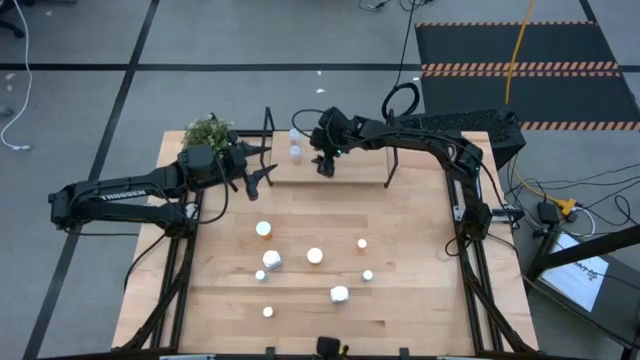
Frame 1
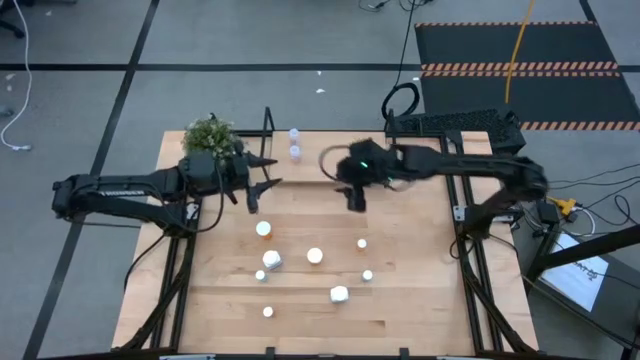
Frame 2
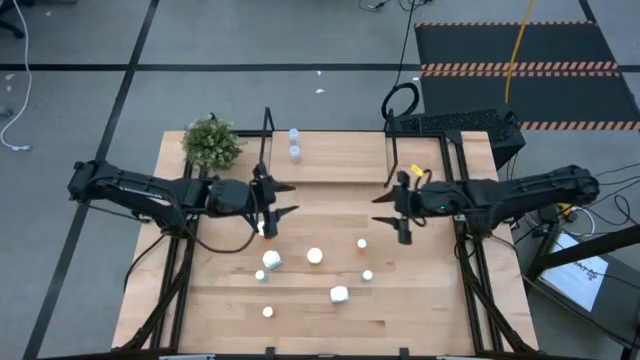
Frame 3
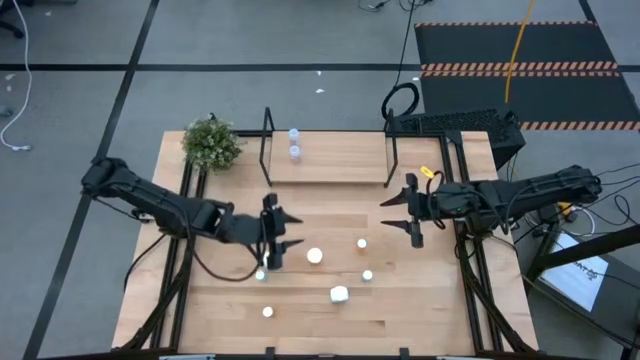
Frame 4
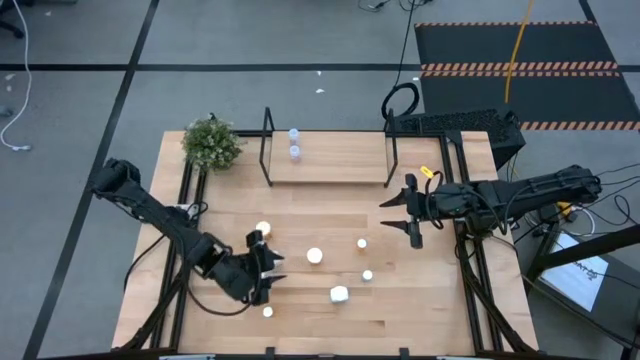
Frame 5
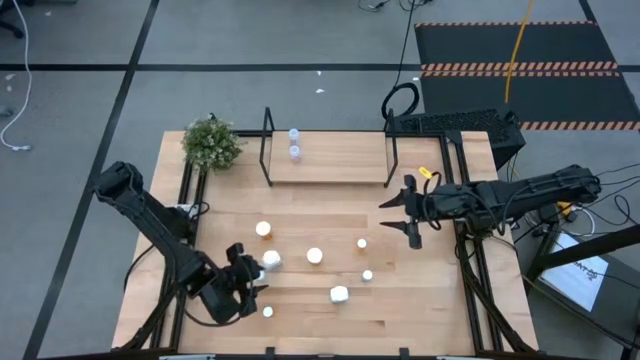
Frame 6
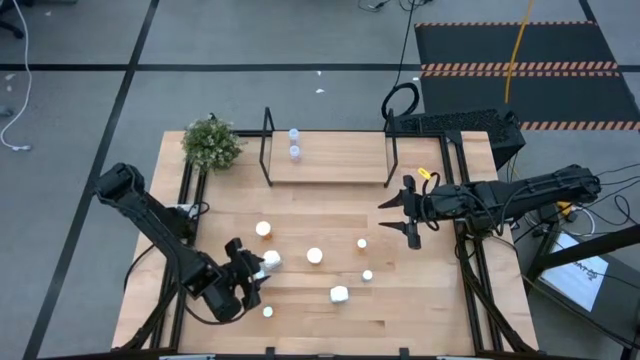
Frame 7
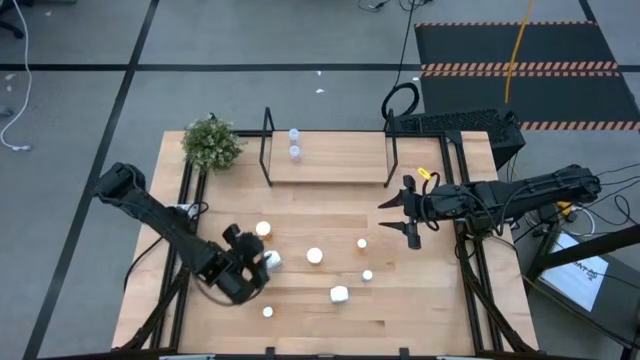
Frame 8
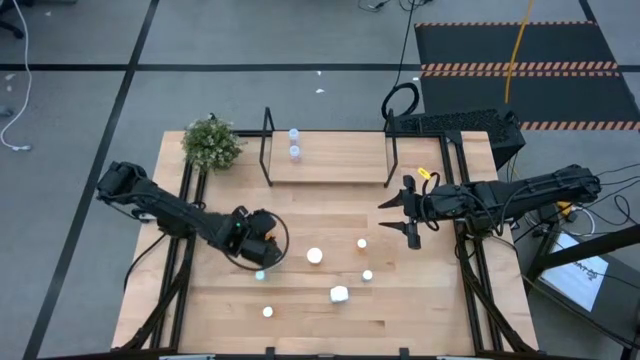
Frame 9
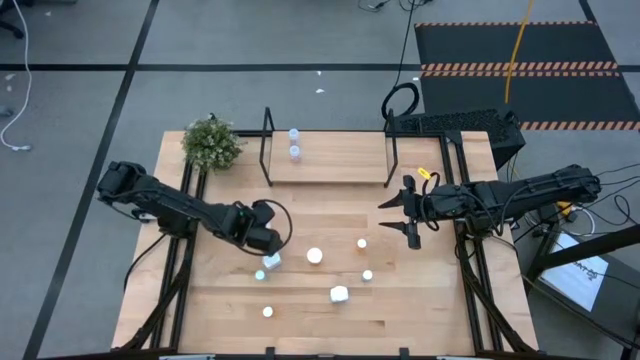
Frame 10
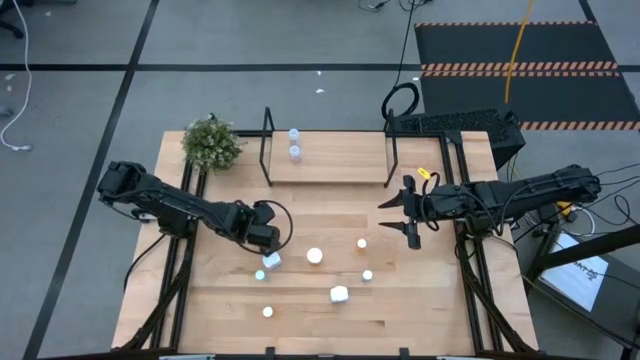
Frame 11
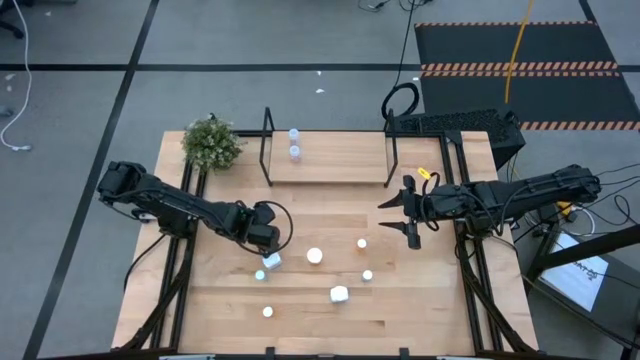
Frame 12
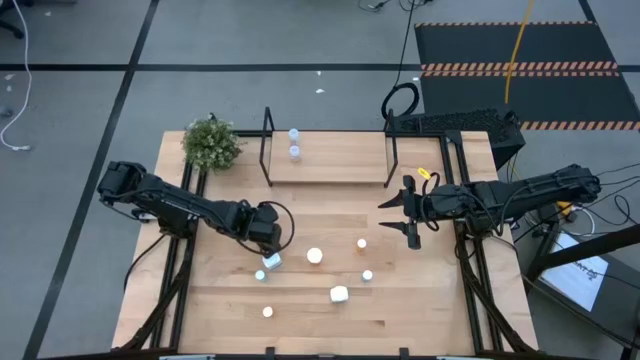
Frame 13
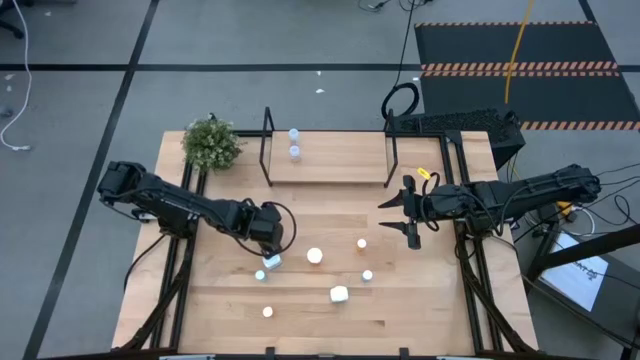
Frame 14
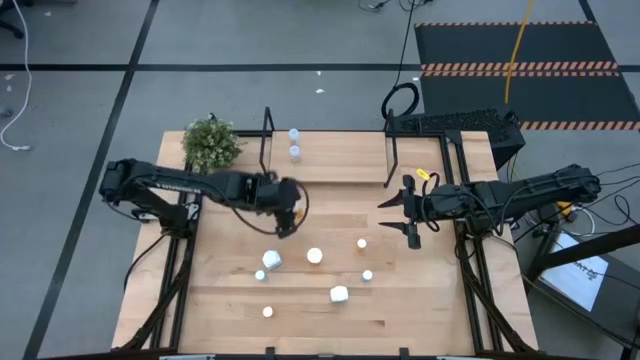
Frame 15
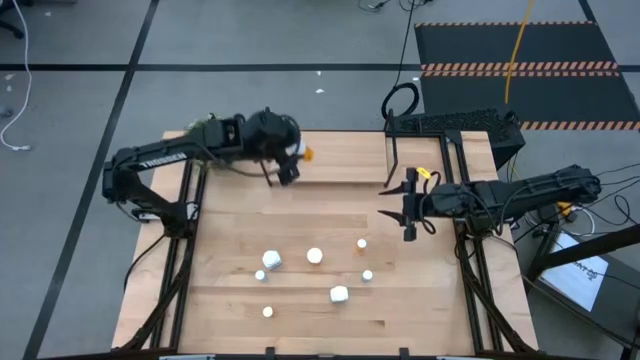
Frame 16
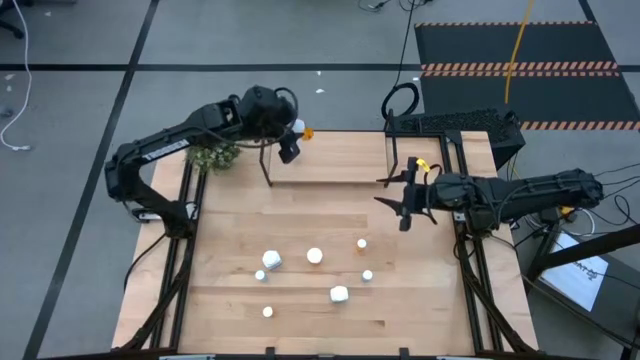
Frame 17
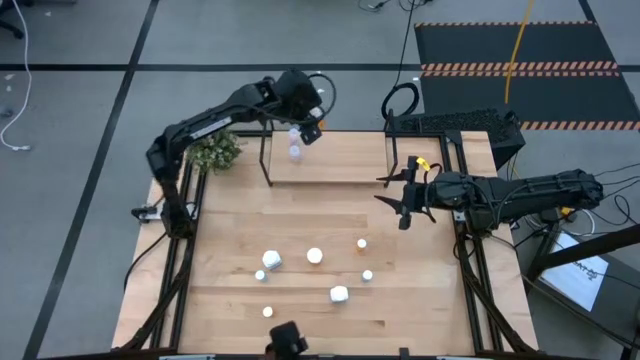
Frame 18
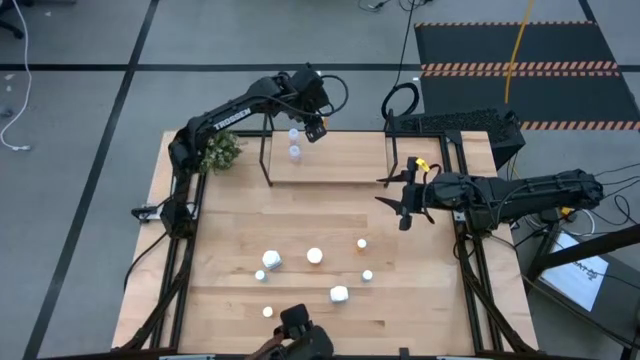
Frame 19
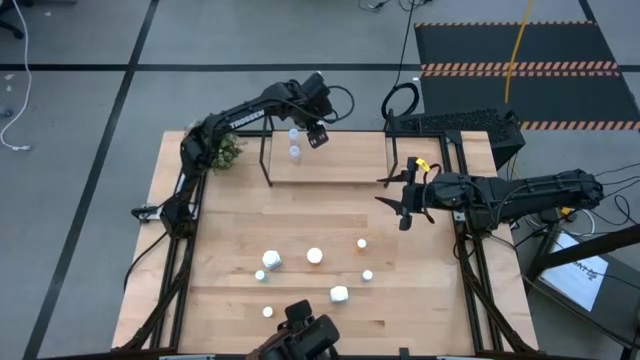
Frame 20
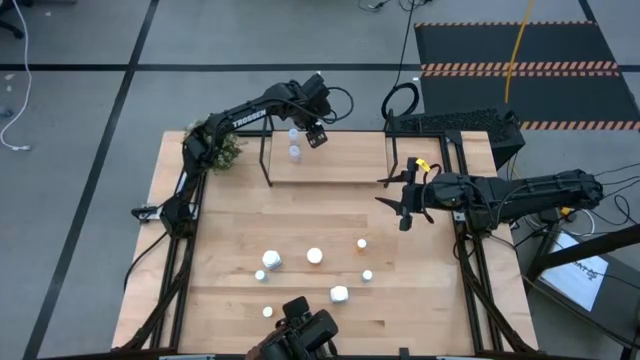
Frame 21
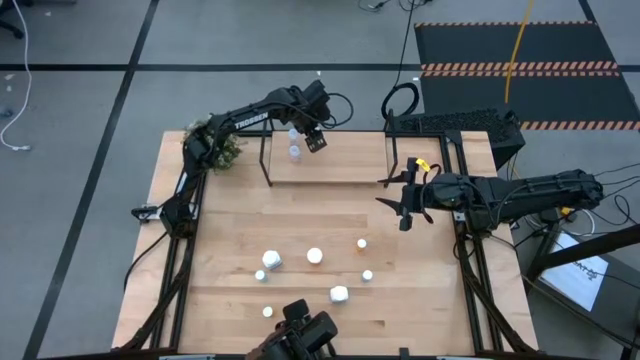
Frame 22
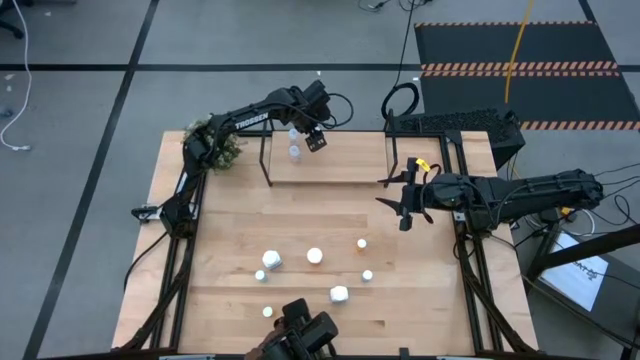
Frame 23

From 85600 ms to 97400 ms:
Task: Pick and place medicine bottles onto shelf by color
Put the left large orange pill bottle on the shelf

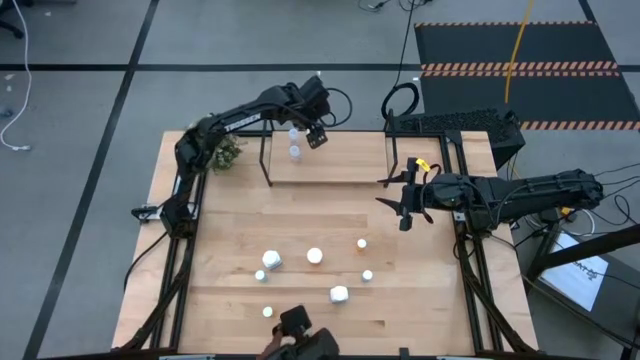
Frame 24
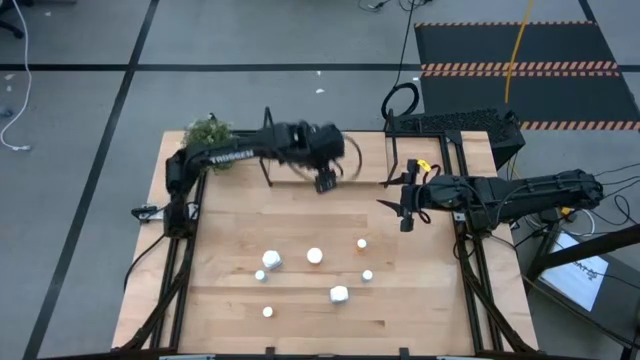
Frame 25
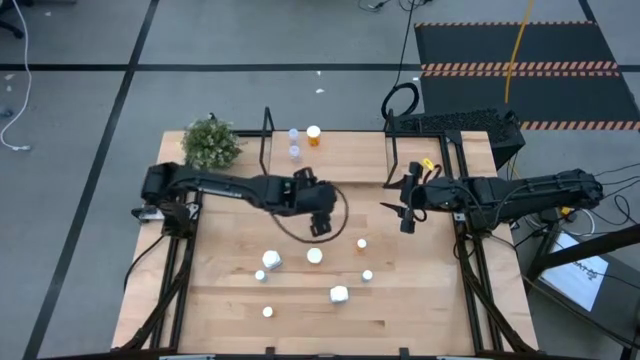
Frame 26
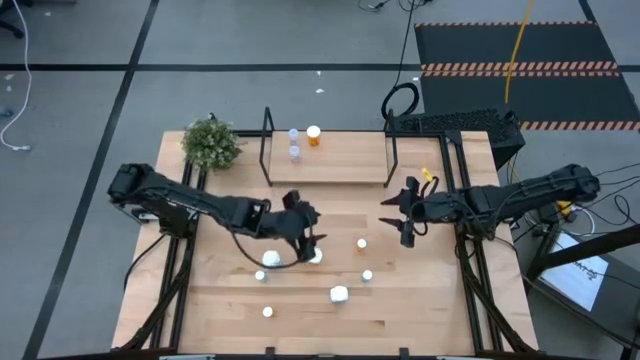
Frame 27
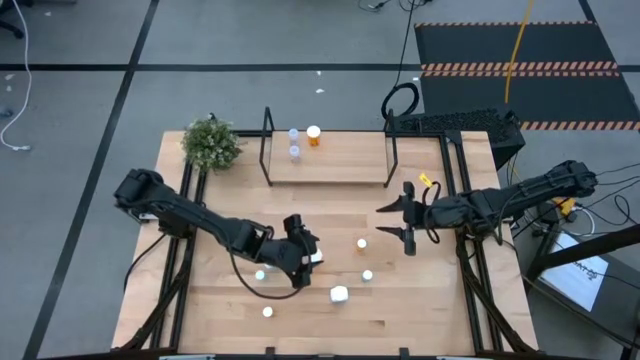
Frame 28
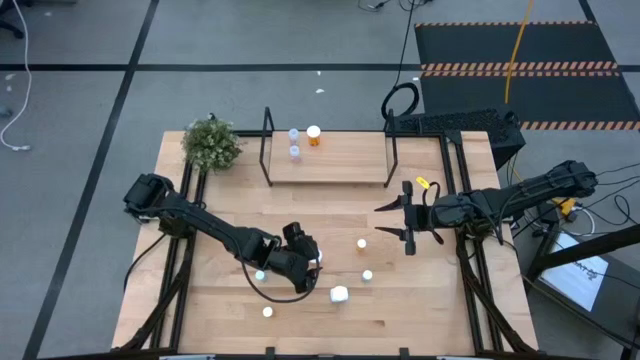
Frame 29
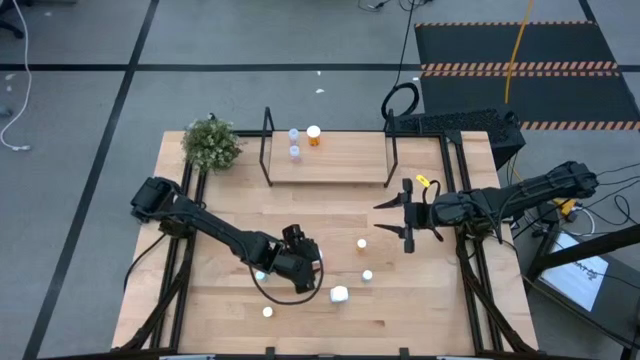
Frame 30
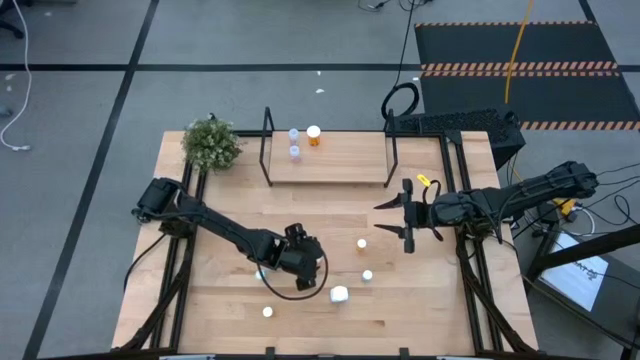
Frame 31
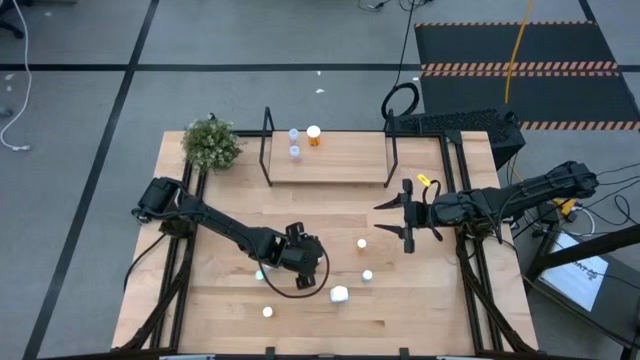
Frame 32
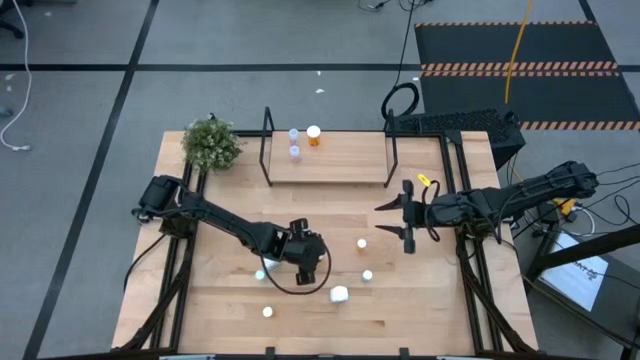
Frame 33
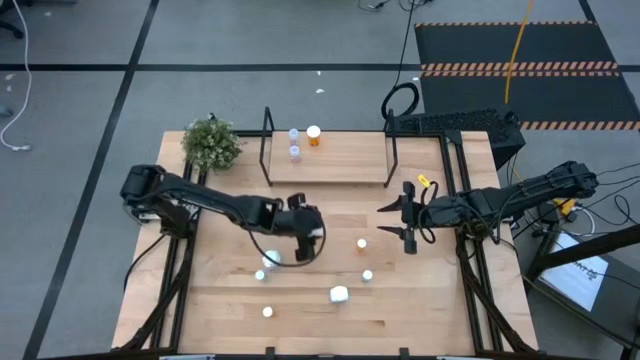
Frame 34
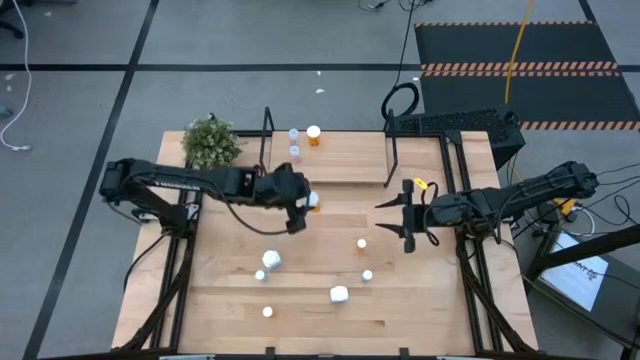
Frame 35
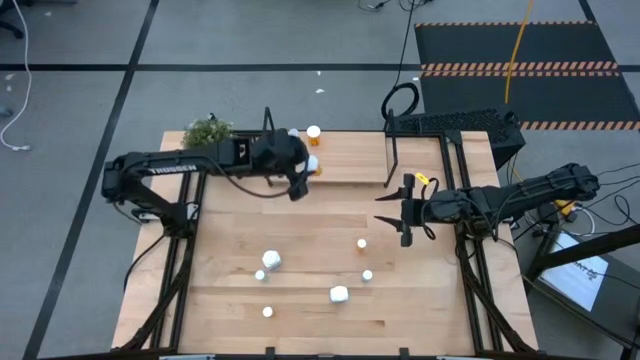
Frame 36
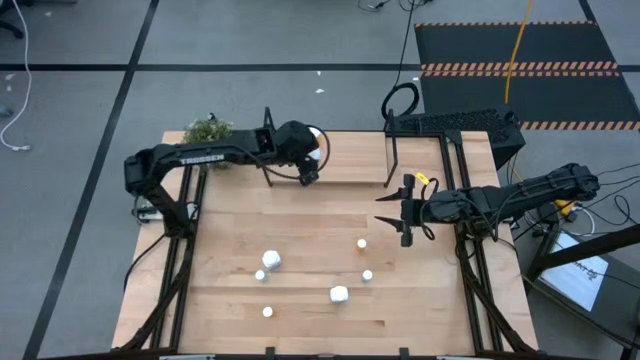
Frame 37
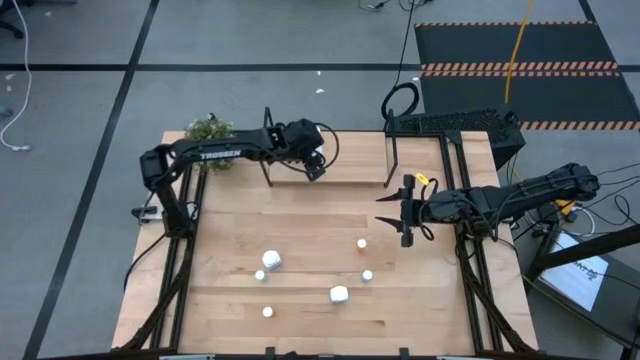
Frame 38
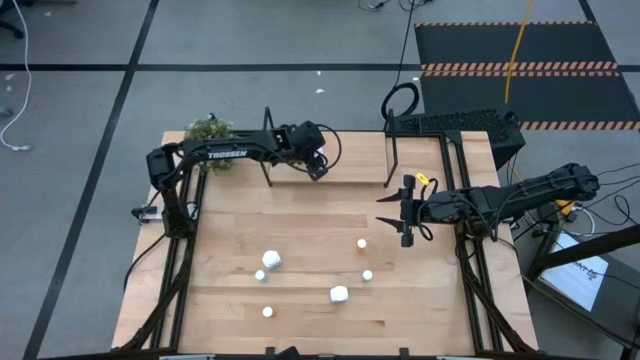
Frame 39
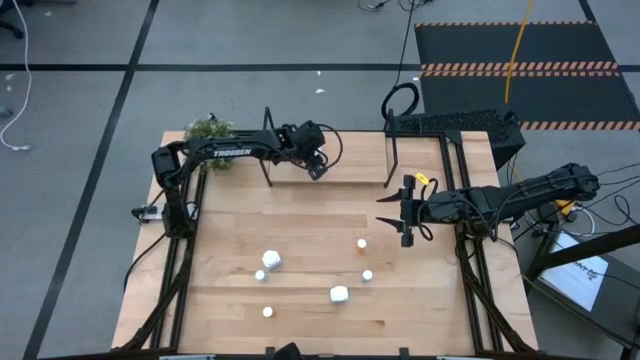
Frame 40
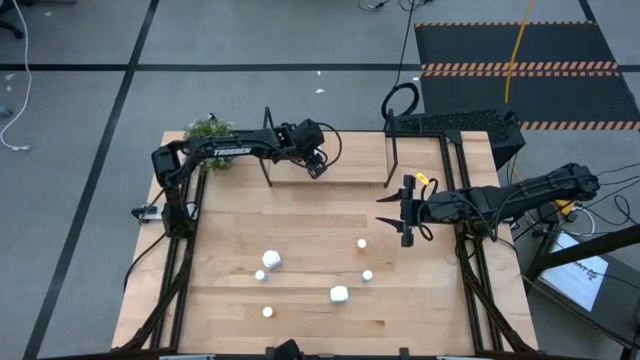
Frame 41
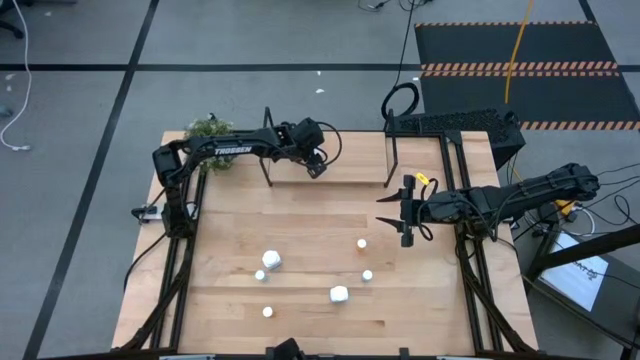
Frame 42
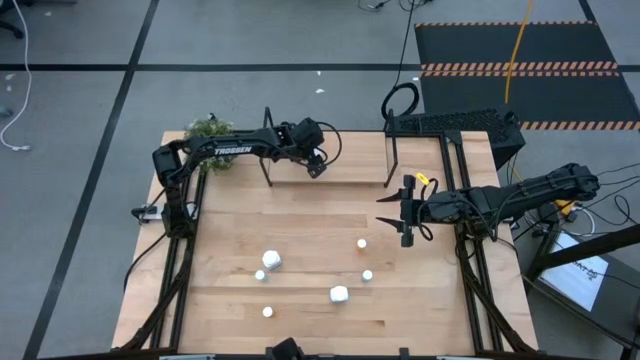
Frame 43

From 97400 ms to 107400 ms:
Put the large orange pill bottle on the shelf aligned with the other large orange pill bottle

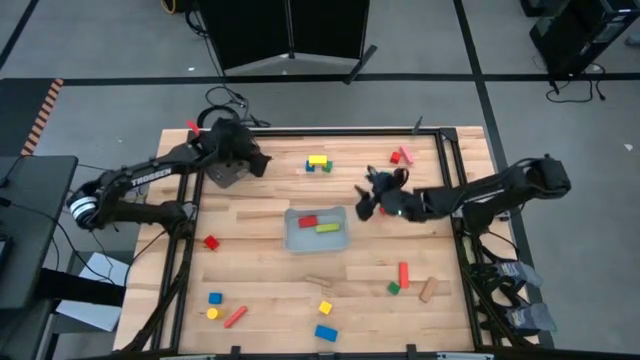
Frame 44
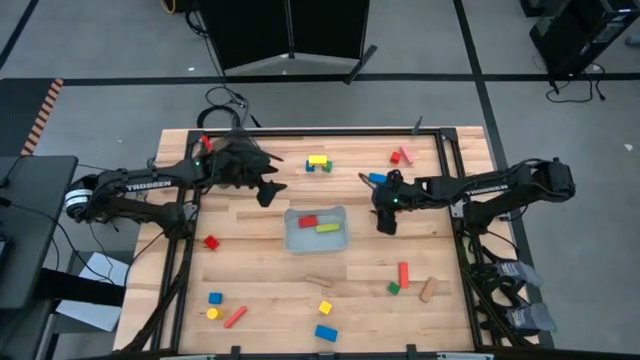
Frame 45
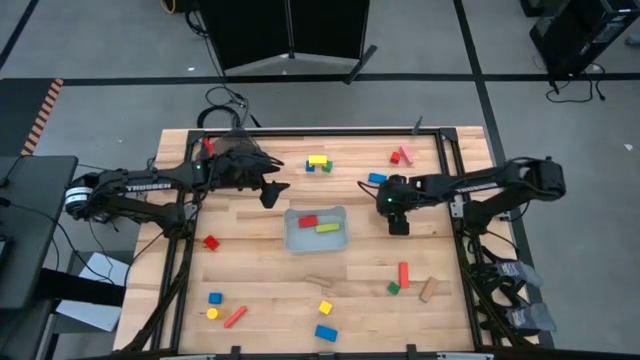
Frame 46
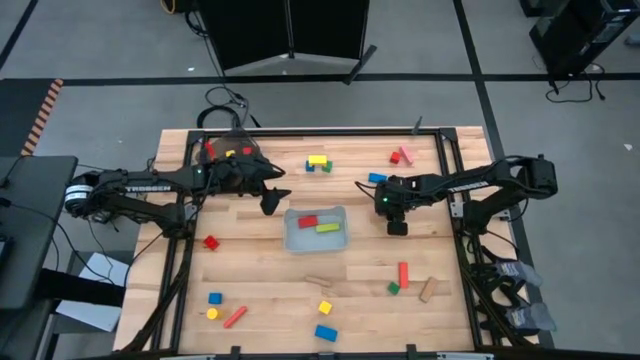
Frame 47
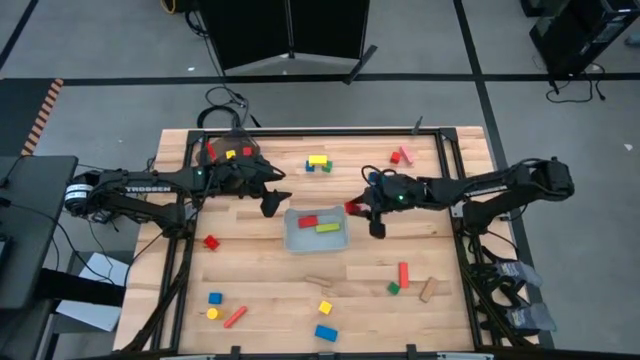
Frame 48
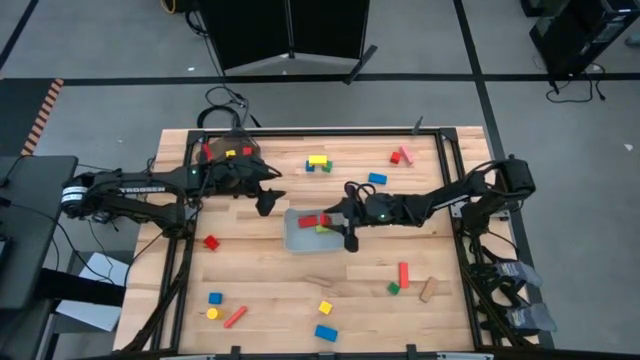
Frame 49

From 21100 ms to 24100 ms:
Task: Sort blocks by size
Put the top red rectangular block into the gray bin
